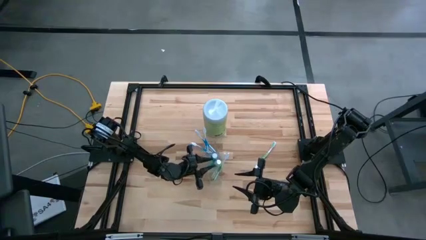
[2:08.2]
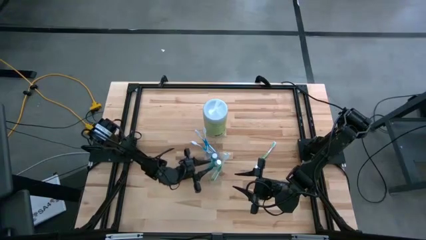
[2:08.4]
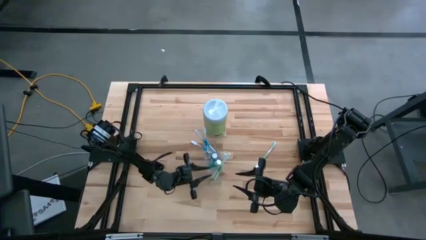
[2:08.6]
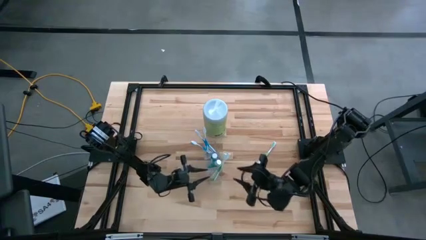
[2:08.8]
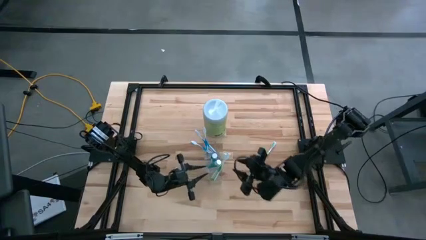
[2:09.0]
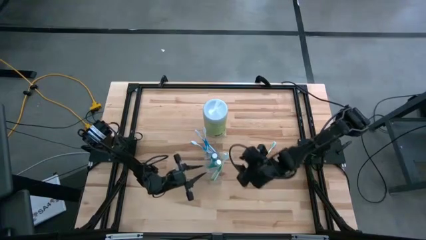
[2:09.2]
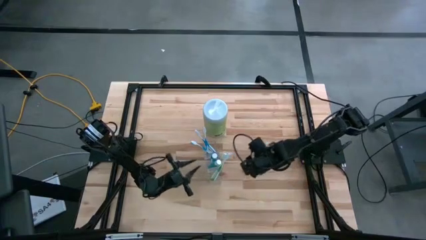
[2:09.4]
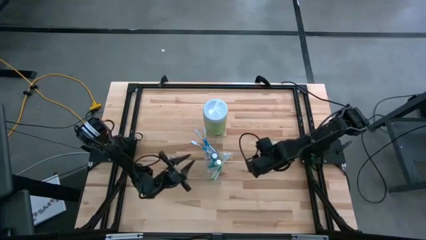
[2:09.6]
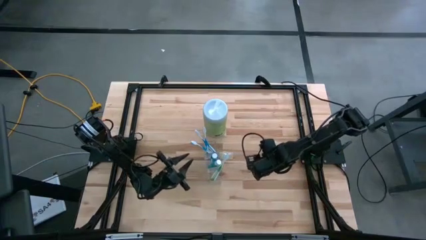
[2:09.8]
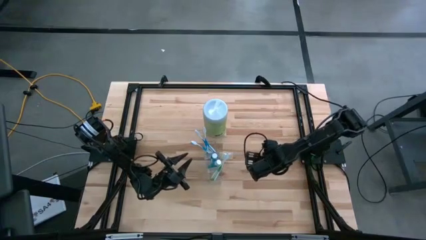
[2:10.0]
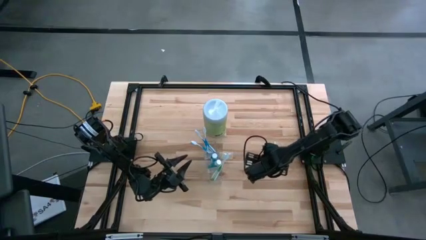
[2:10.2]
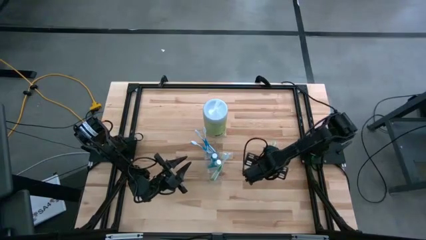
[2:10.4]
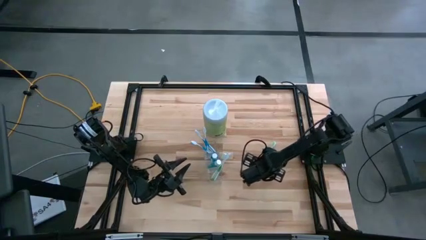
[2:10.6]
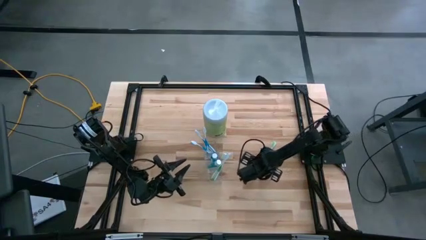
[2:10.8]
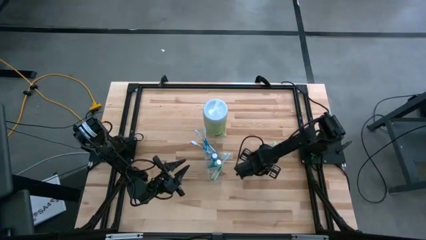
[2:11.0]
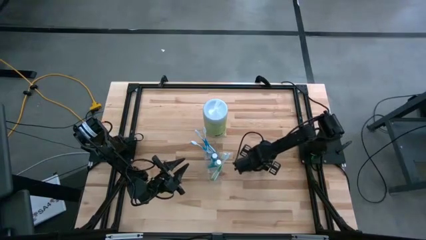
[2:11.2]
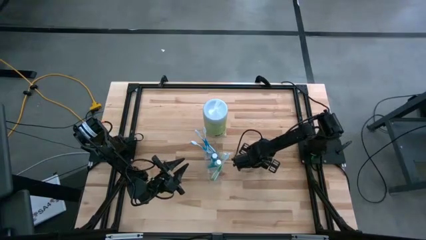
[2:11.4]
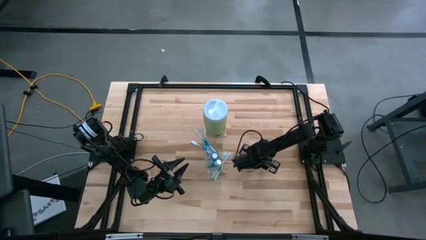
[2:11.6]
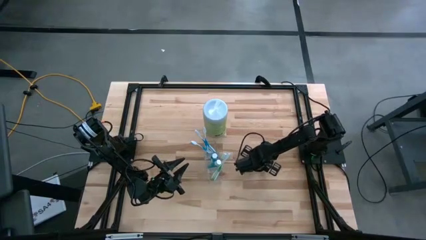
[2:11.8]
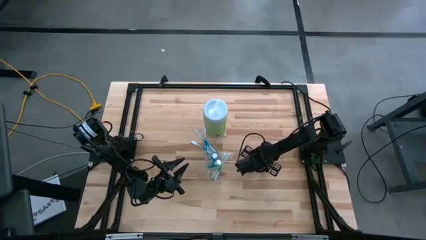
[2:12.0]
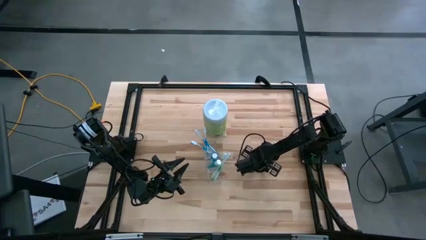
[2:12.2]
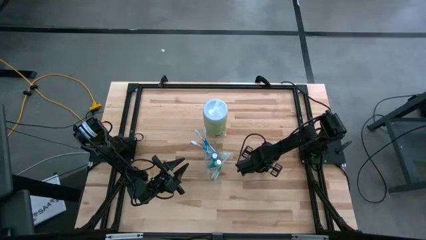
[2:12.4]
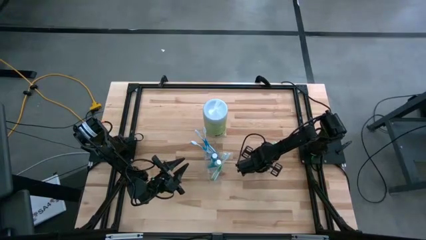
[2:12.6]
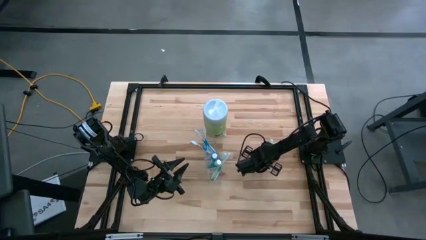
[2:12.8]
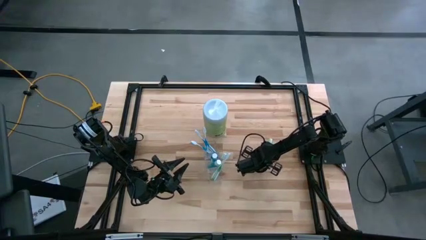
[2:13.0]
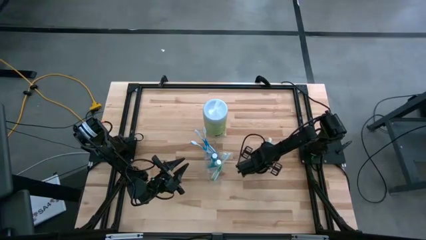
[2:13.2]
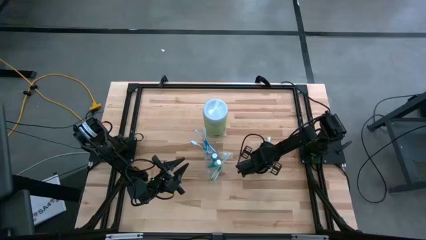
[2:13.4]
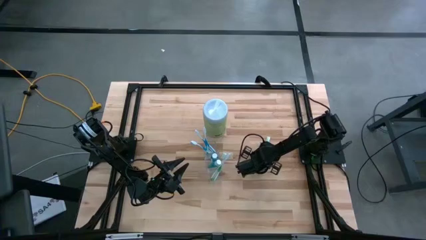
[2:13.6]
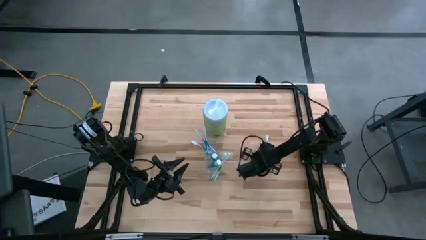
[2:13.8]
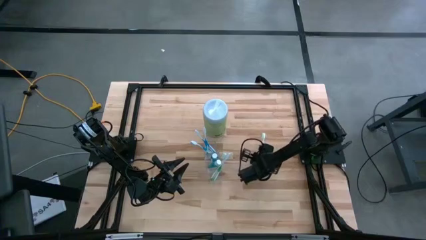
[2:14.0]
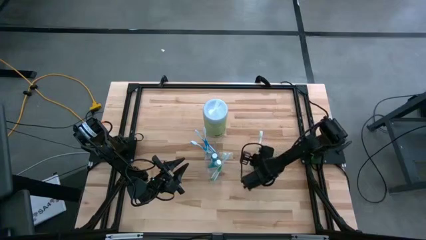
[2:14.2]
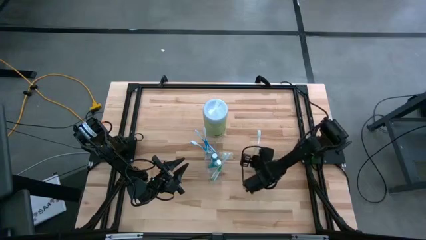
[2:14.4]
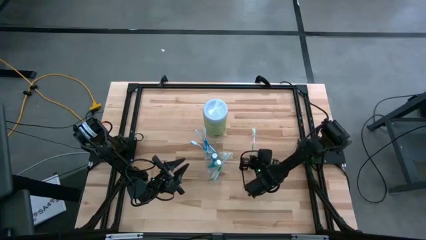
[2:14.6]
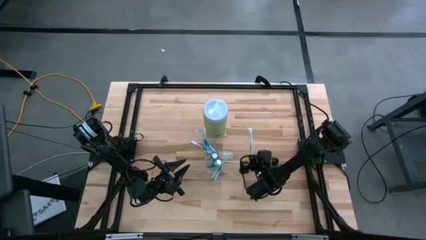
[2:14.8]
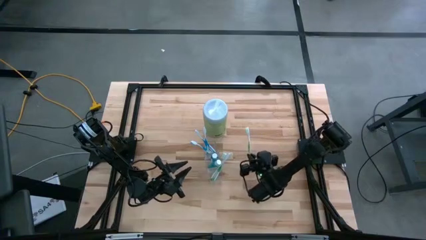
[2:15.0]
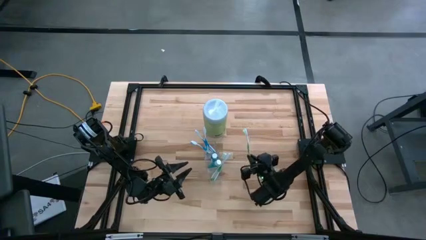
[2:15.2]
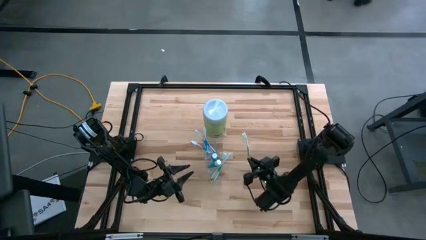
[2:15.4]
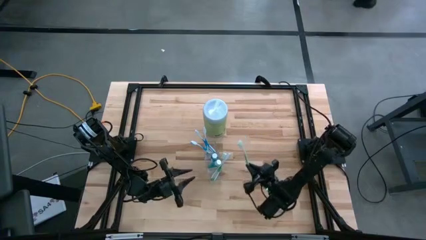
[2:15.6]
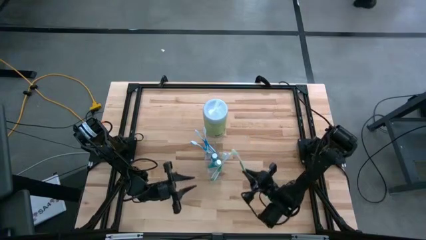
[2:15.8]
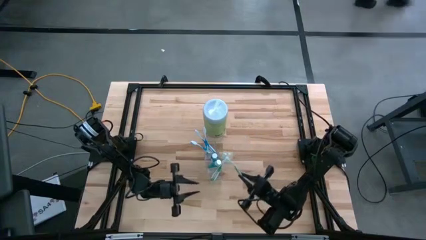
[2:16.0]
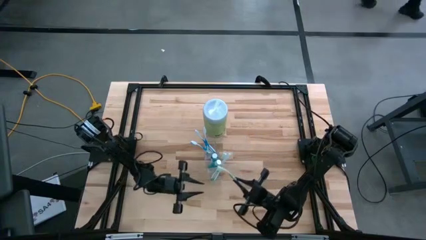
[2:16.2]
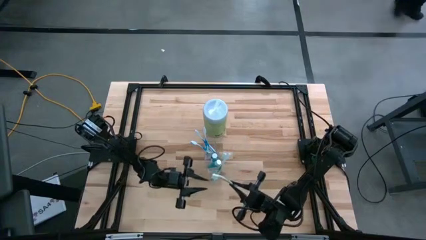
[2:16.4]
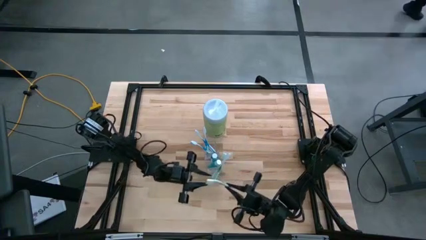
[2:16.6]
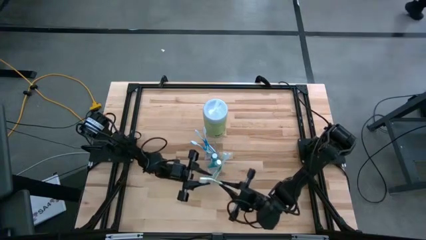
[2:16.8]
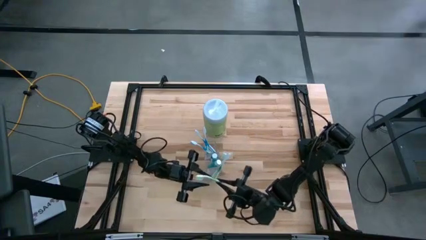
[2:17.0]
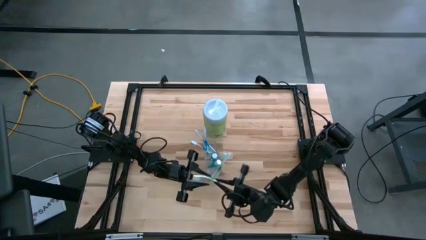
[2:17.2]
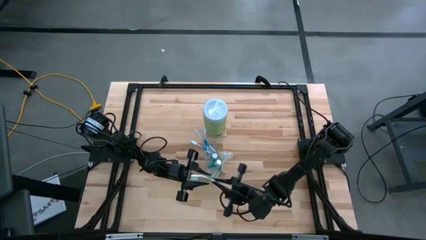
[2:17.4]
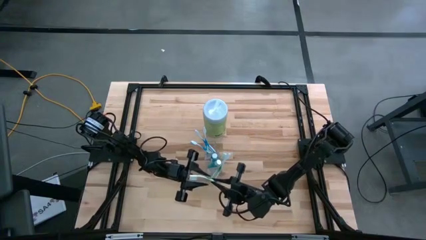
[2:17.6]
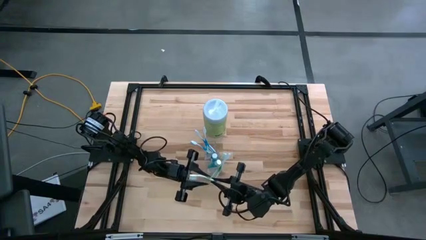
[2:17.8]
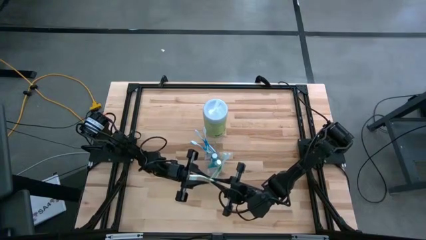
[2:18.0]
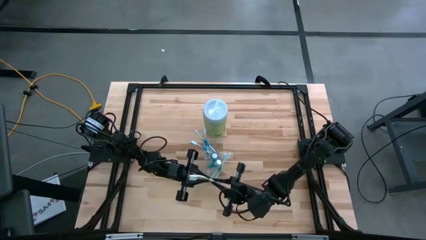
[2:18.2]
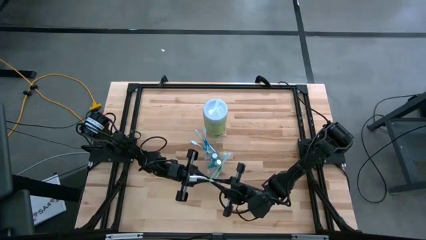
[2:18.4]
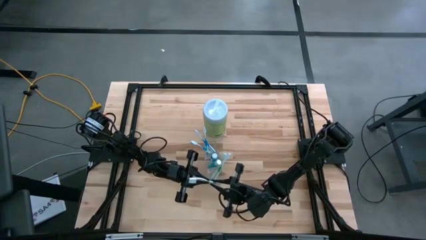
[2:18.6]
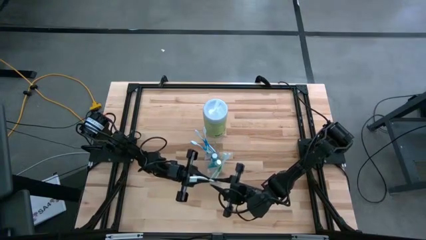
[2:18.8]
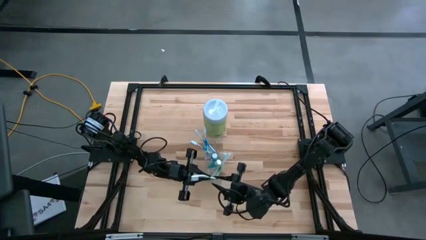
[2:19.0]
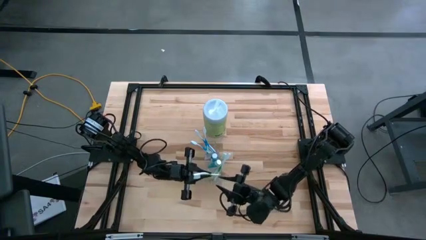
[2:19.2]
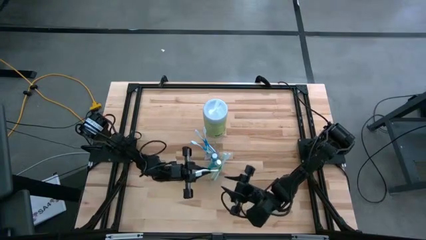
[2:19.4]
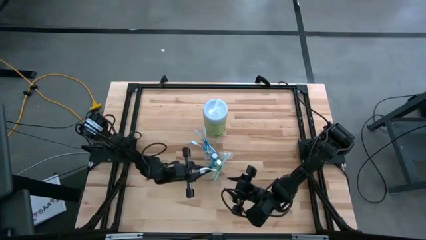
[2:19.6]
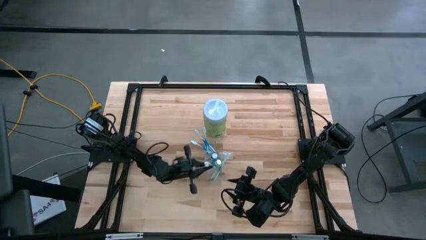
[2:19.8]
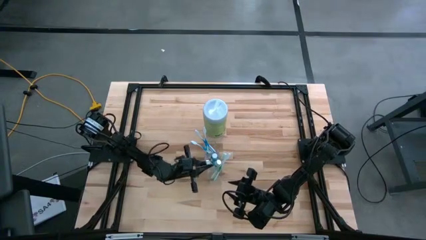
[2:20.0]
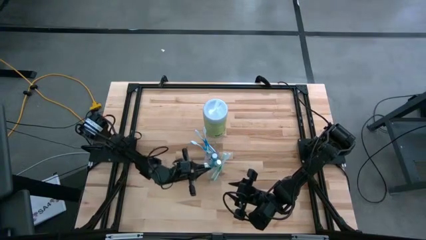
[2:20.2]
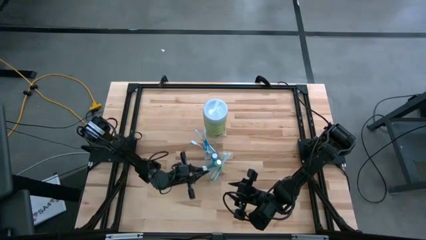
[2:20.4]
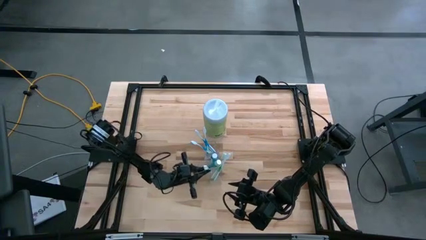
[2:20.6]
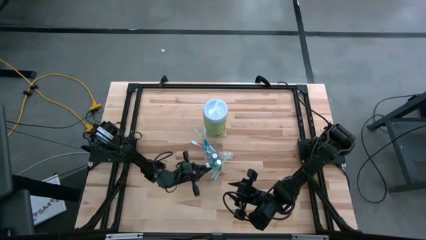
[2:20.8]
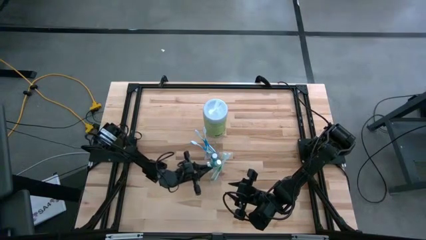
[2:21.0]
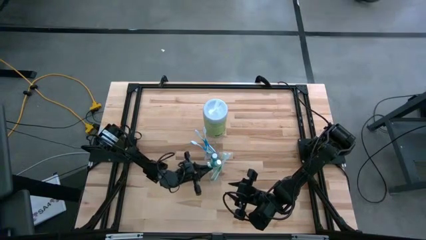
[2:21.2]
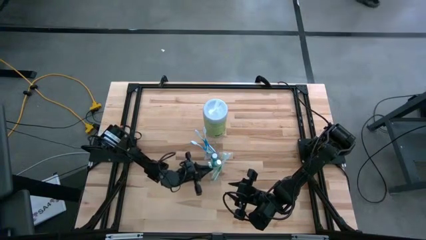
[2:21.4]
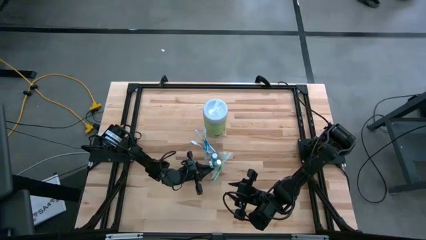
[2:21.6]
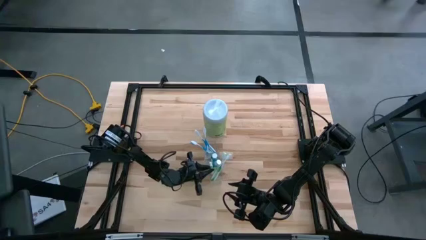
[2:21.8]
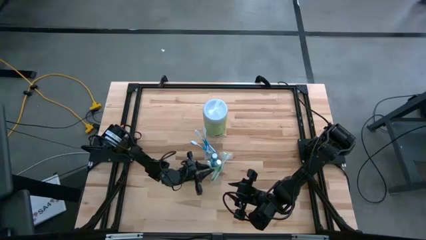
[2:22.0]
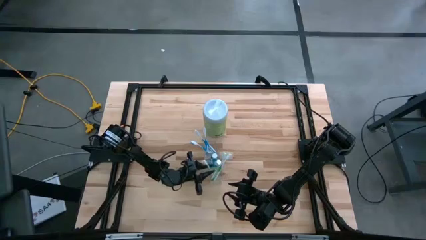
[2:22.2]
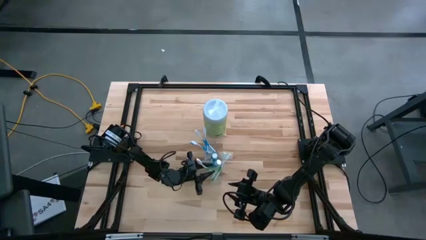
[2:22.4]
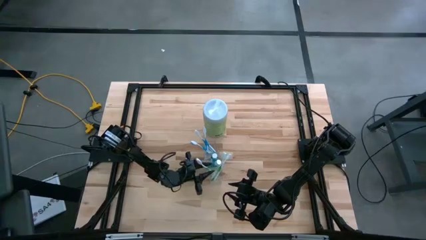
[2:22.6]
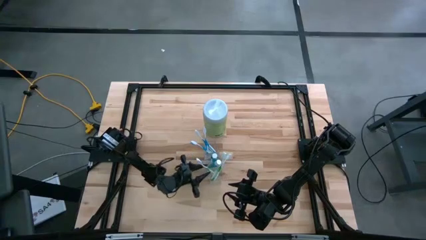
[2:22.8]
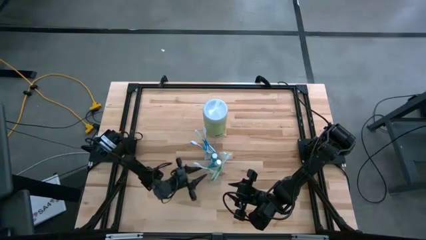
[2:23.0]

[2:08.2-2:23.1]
Task: Pick & Place toothbrushing station
Put the green toothbrush into the transparent organizer

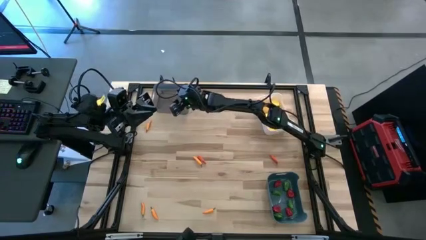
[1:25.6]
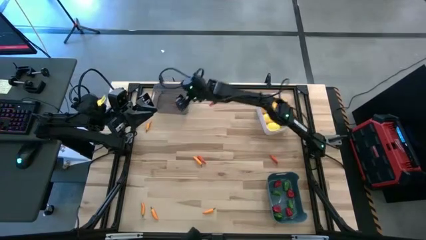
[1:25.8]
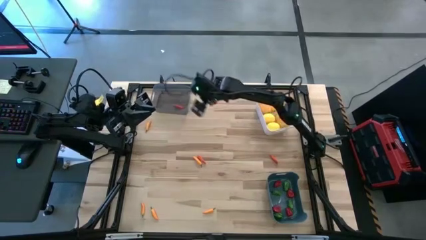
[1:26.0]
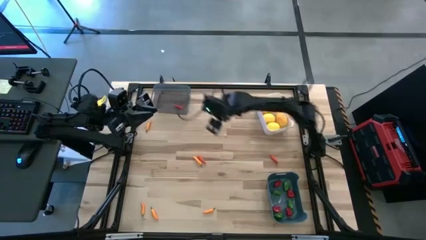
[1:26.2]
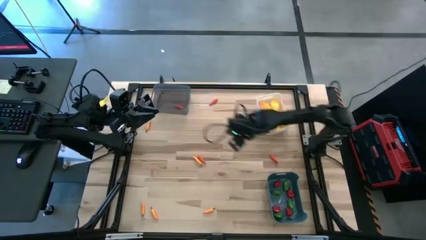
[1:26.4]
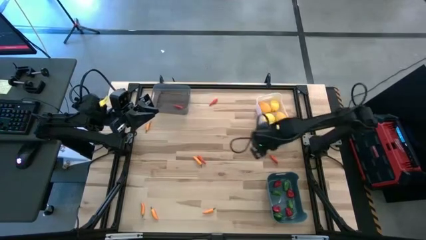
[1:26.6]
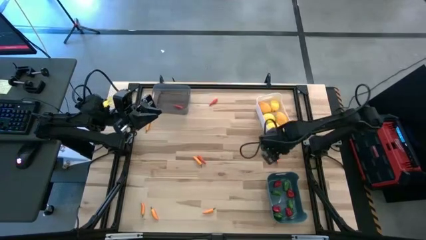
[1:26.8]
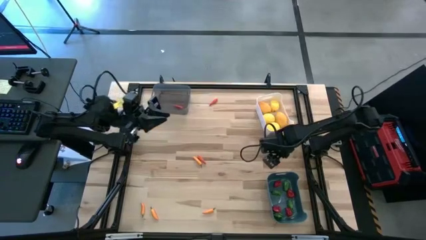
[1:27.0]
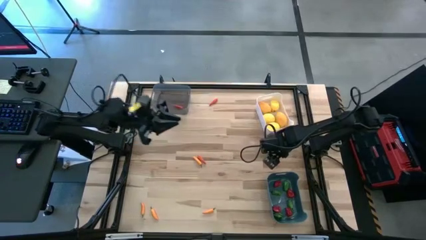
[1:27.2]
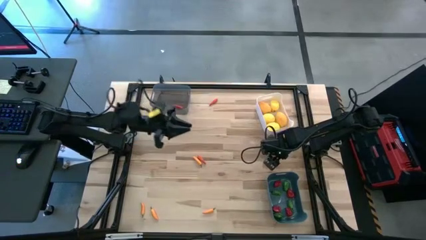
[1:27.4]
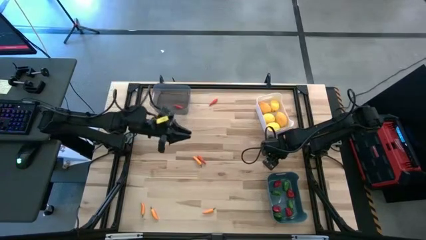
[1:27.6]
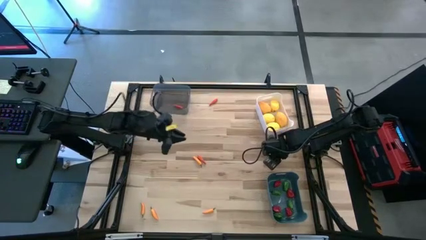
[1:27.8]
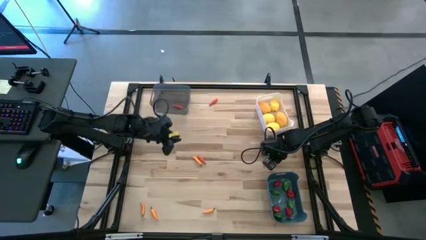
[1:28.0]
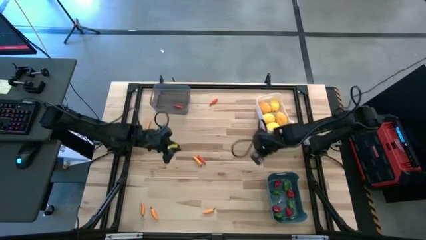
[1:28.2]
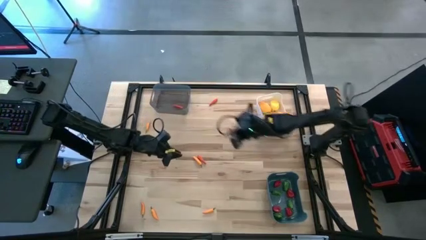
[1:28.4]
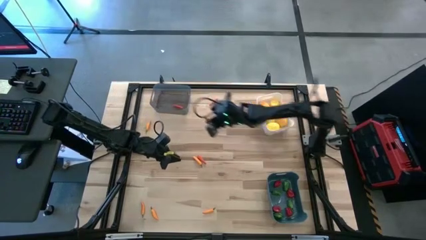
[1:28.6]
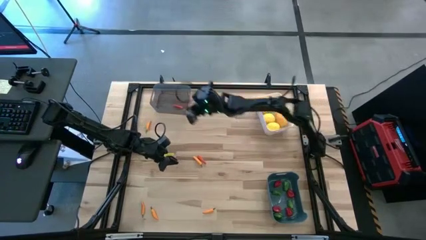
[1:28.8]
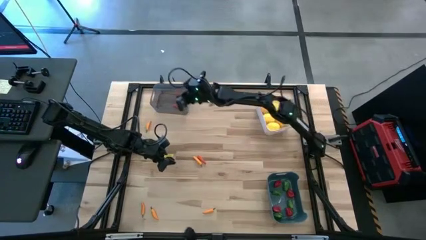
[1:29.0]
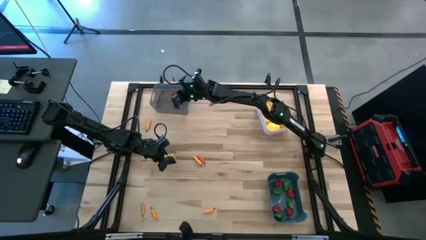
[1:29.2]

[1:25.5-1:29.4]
Task: Sort produce into baskets
Put the orange chili pepper into the black bin
